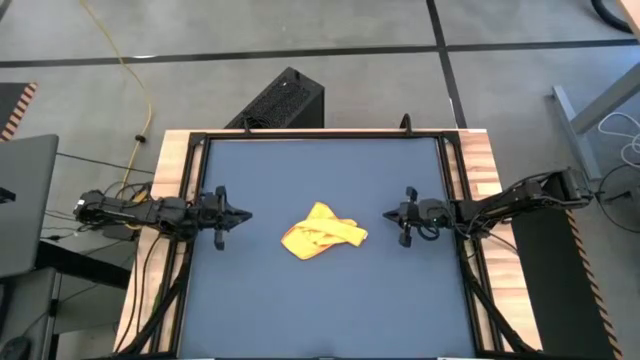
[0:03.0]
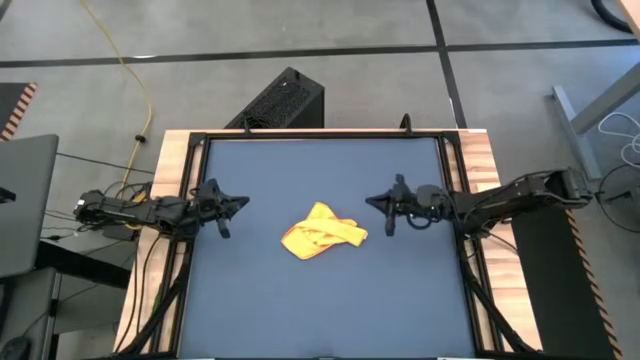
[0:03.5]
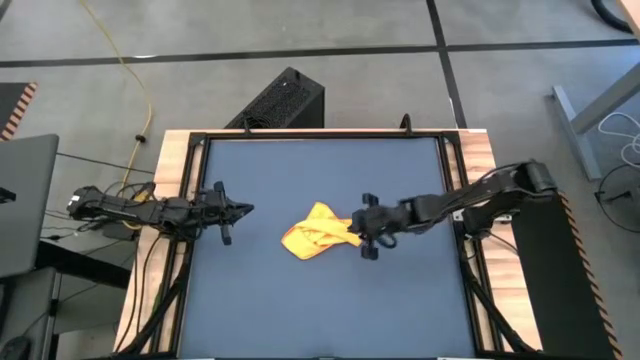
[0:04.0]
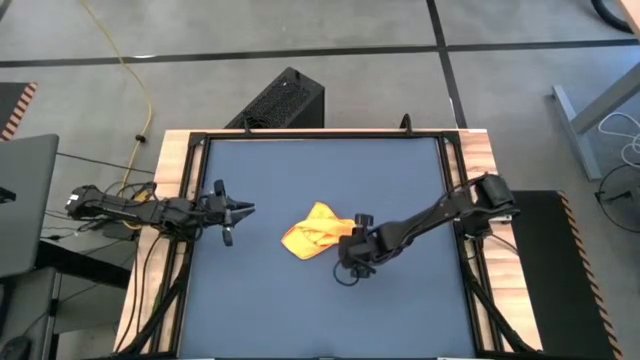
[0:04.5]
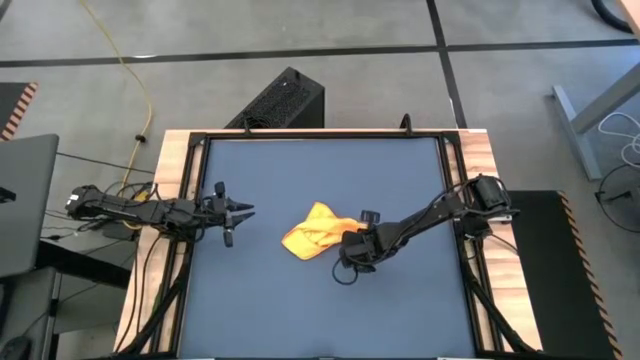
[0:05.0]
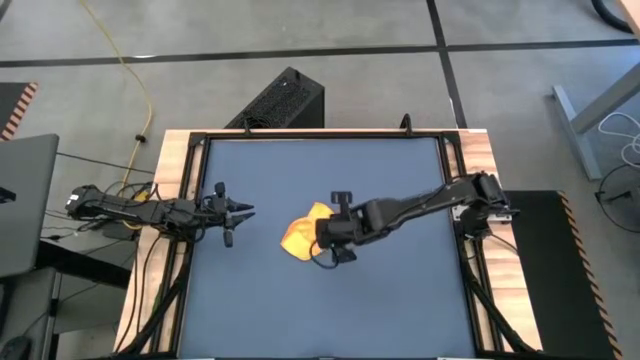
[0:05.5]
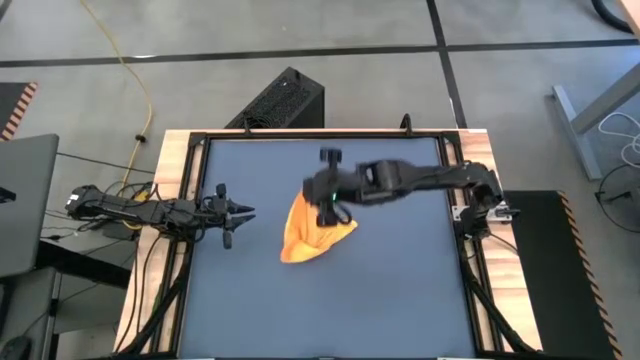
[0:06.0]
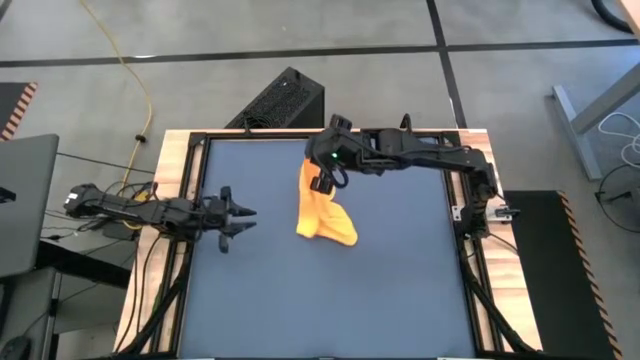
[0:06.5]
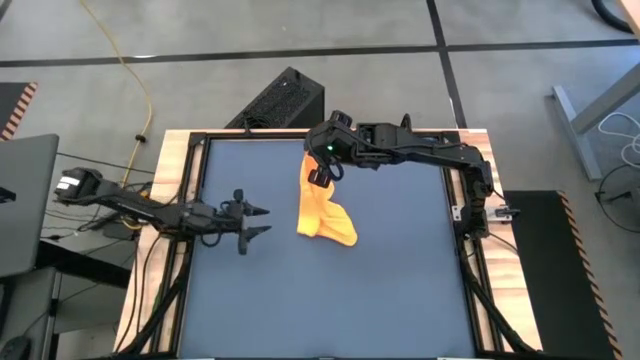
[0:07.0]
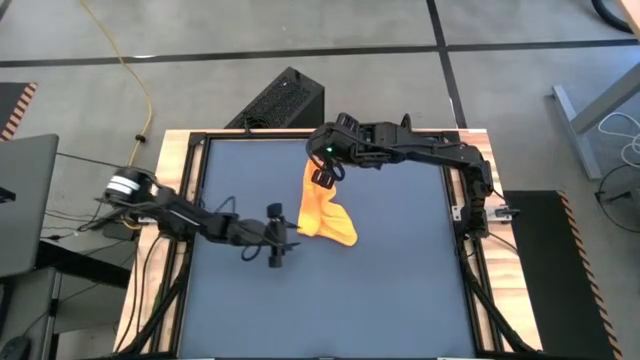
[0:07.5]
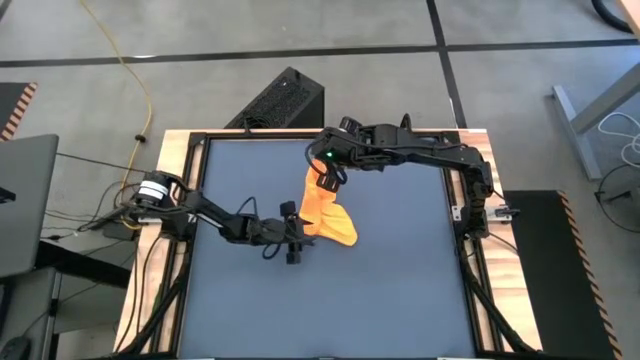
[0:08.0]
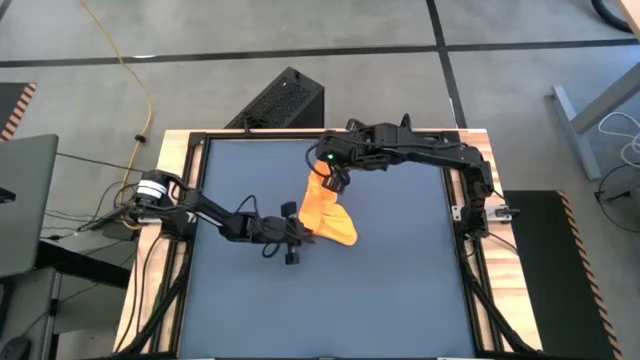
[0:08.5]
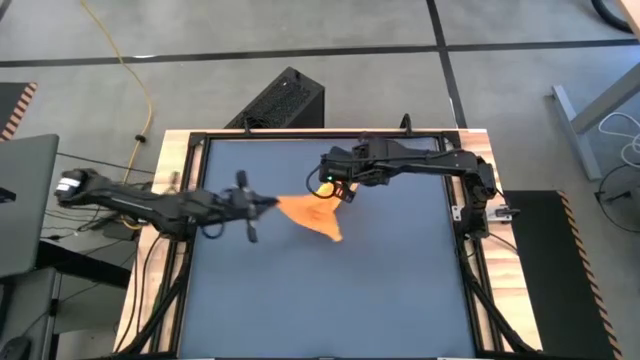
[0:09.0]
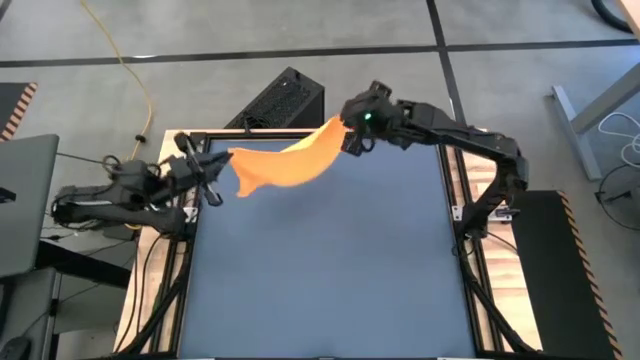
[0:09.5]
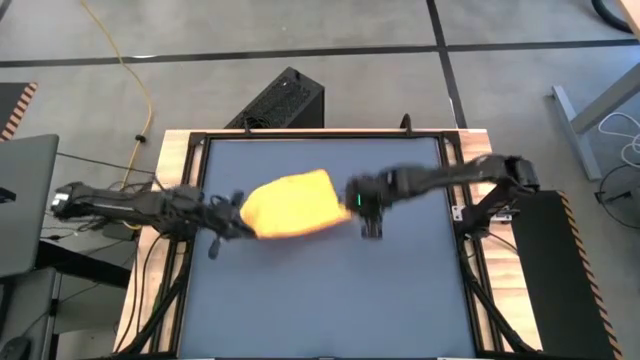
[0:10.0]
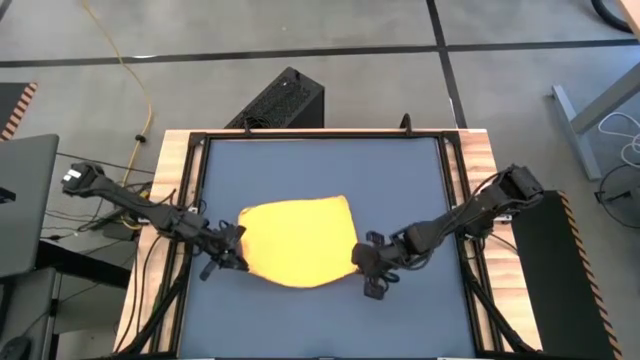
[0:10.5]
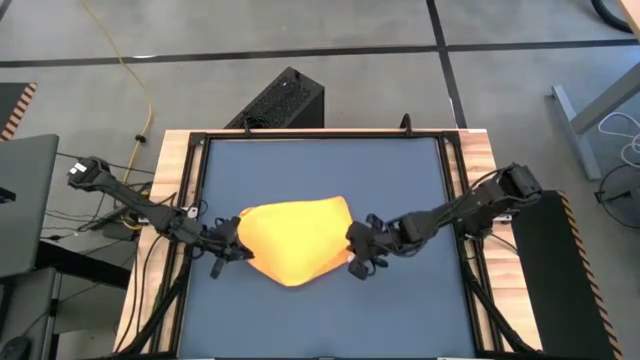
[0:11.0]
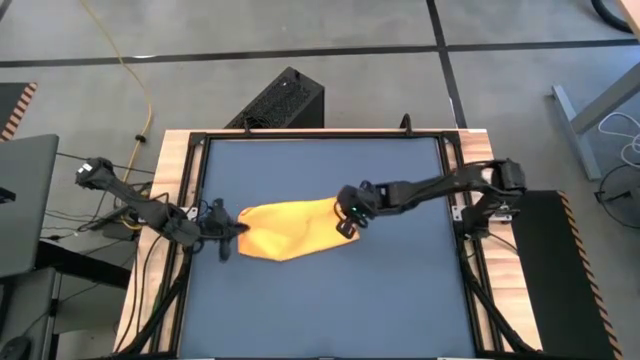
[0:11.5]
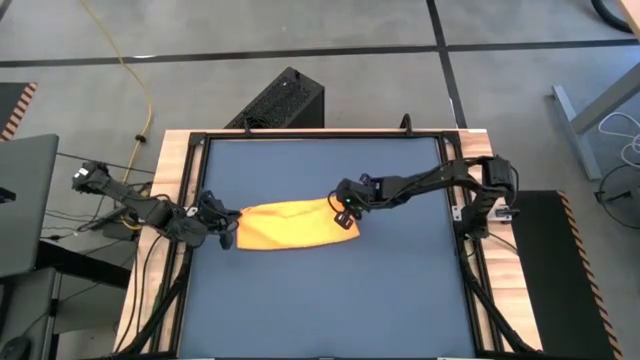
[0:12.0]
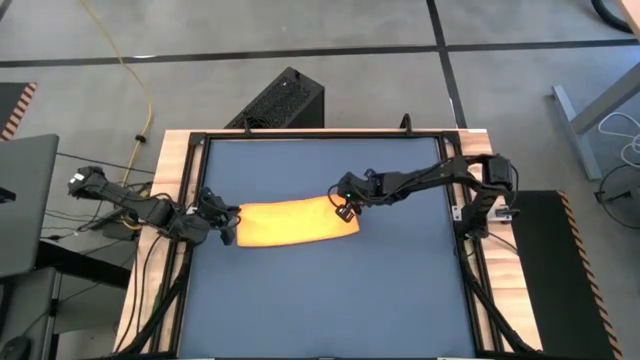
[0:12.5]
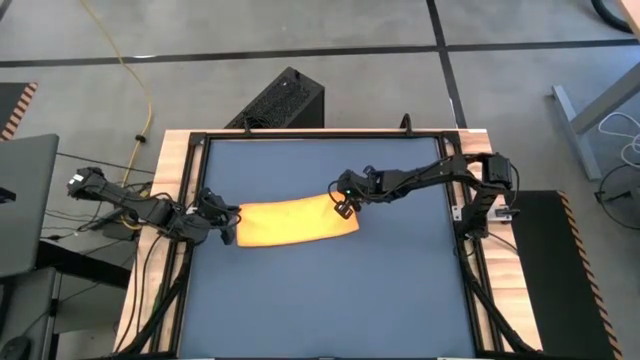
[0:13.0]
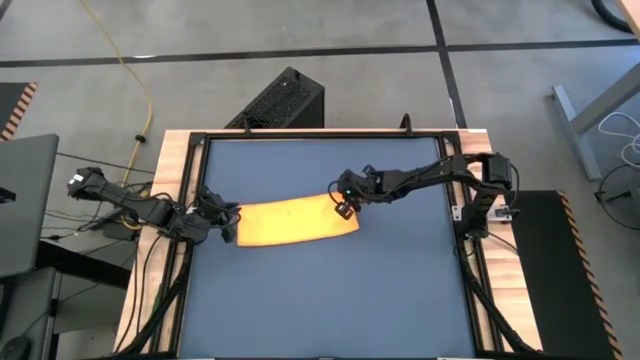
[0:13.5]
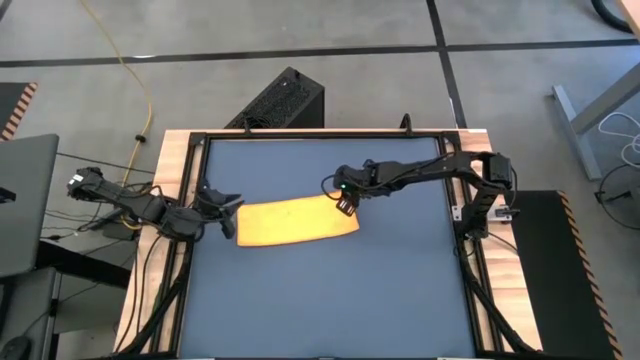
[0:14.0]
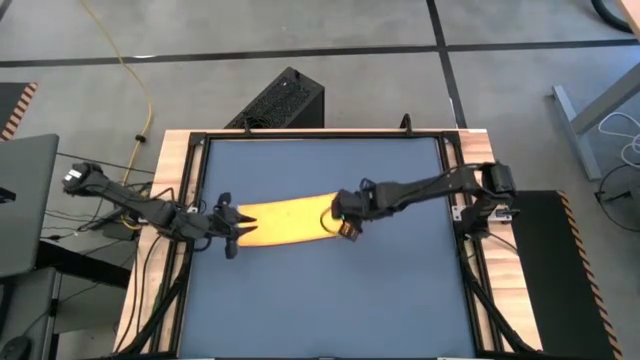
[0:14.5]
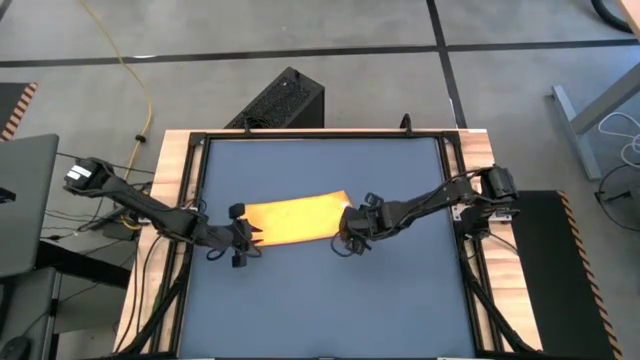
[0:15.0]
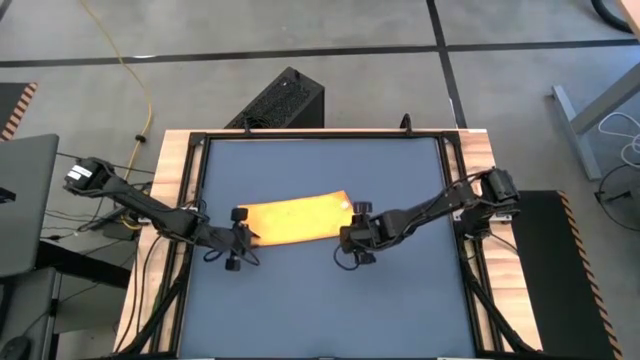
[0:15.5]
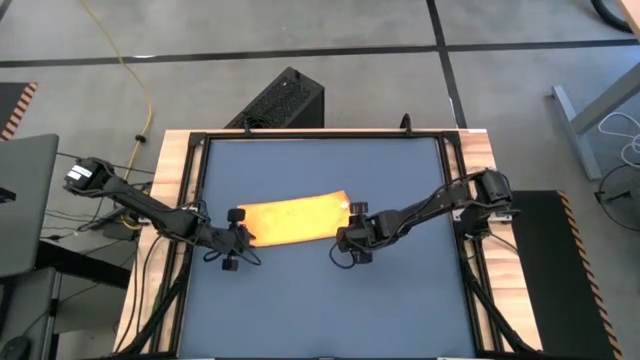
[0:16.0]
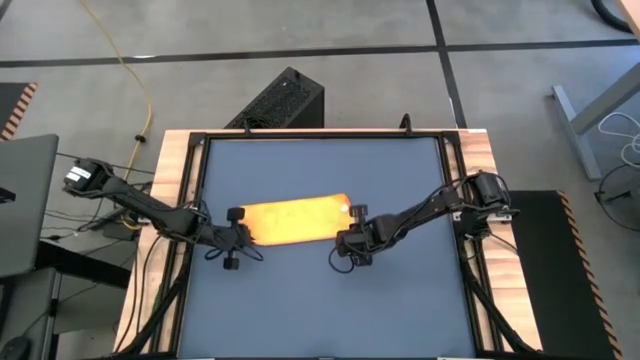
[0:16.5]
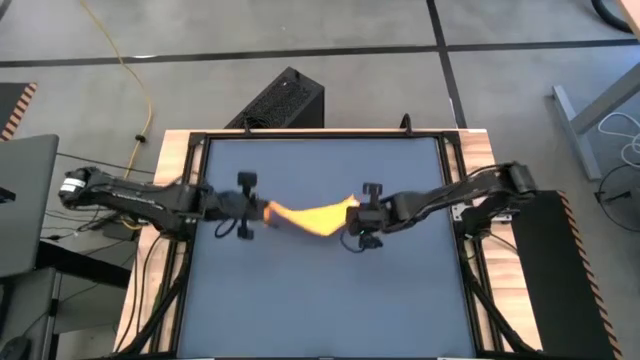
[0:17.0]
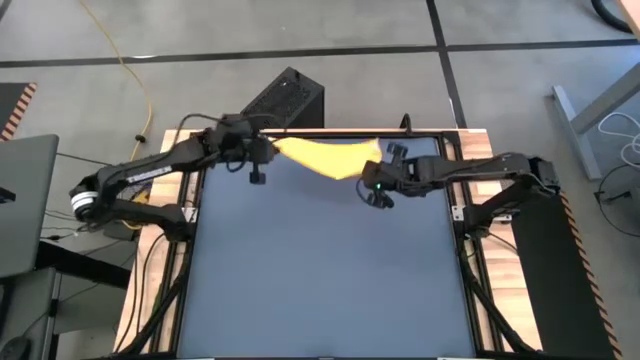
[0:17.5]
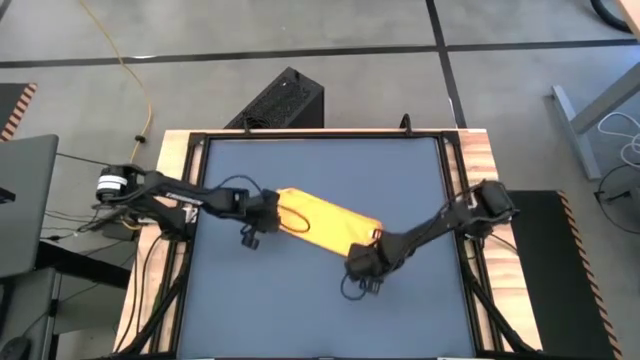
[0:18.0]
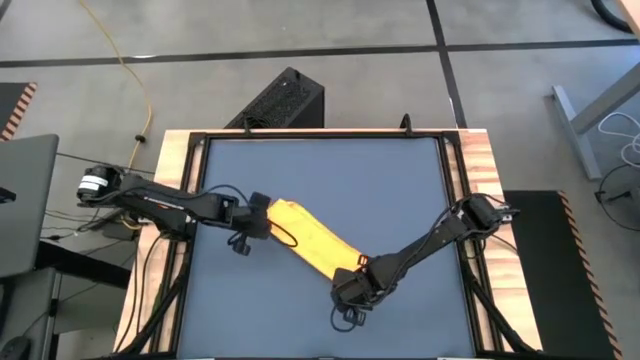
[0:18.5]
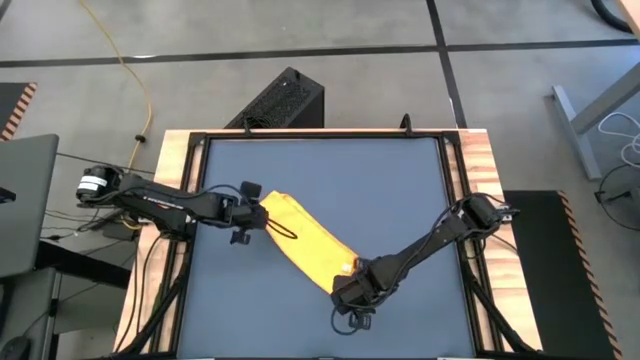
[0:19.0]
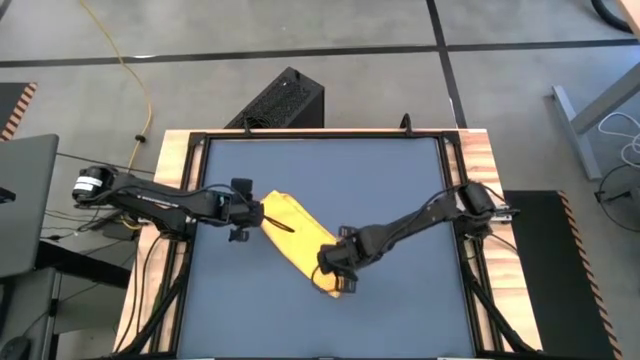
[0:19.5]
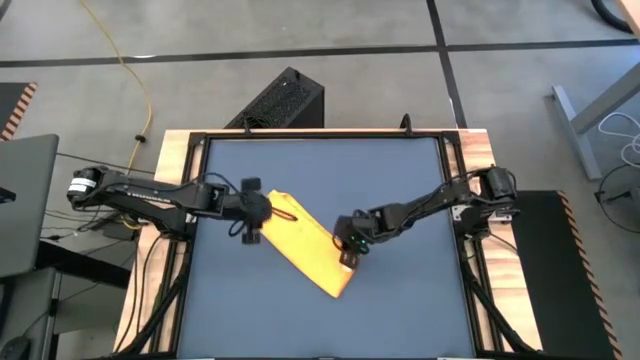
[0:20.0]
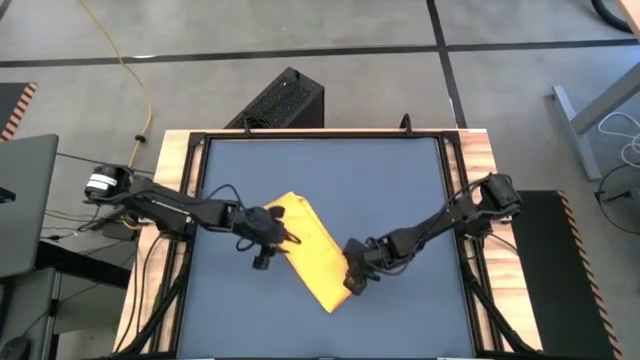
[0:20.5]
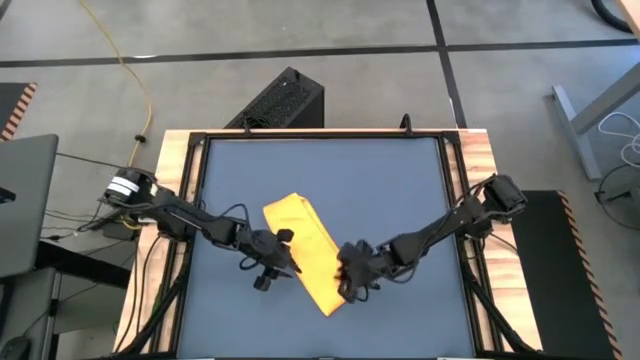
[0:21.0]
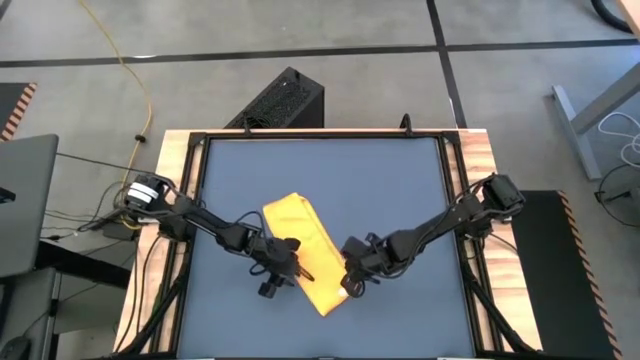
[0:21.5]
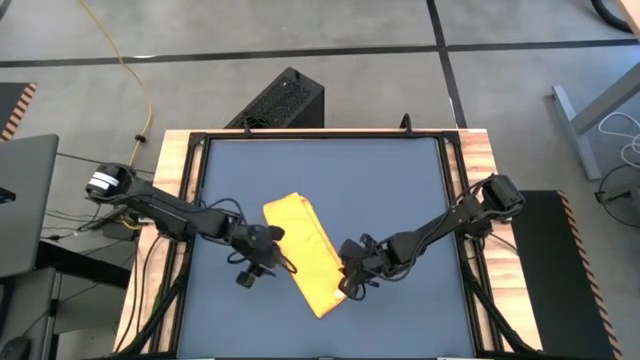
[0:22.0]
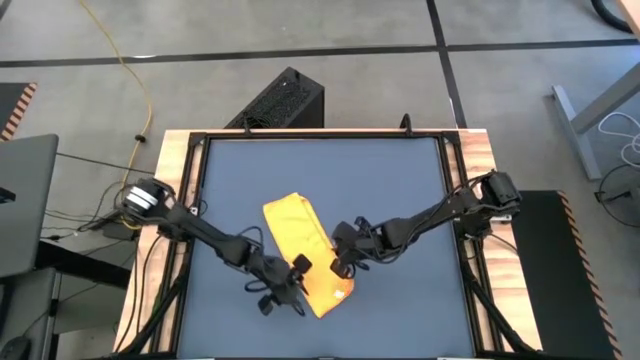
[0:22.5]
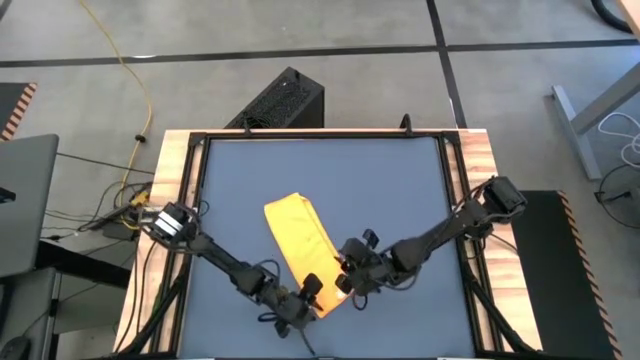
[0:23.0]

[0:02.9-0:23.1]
Task: Roll towel
Roll the yellow microfiber cloth on the table
